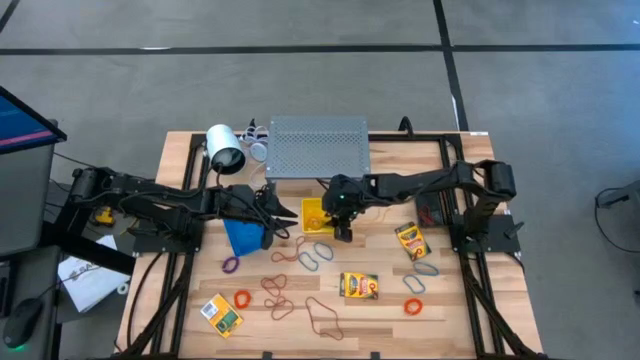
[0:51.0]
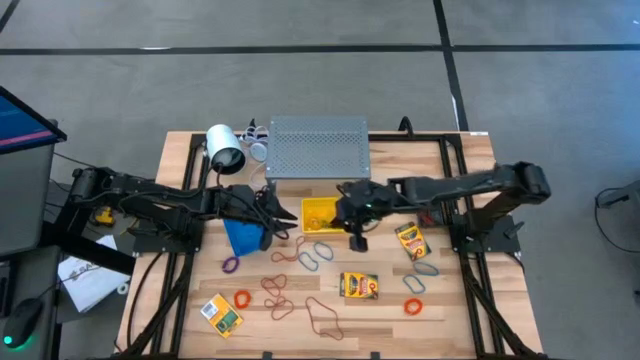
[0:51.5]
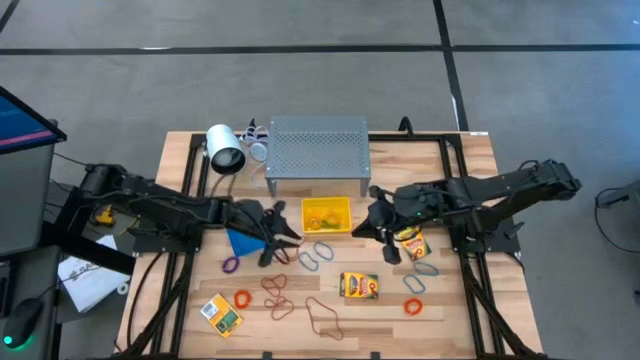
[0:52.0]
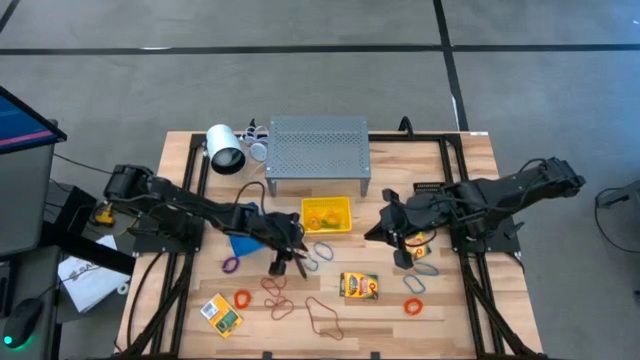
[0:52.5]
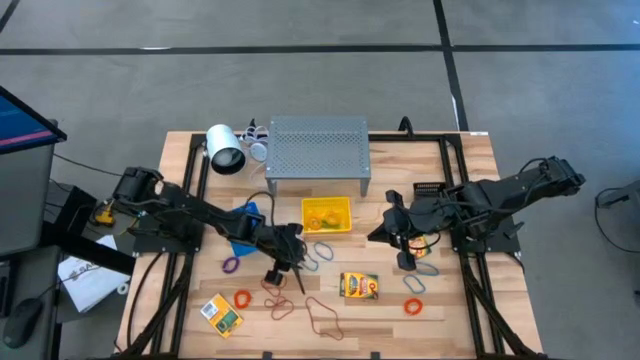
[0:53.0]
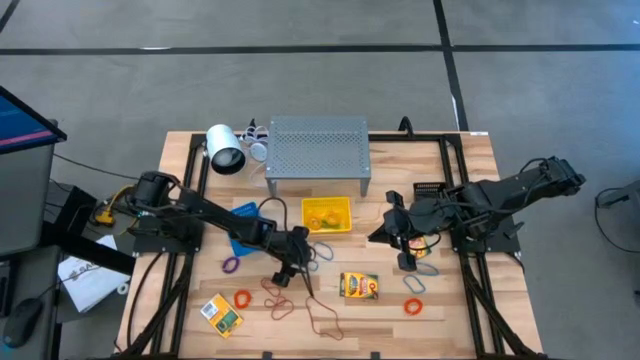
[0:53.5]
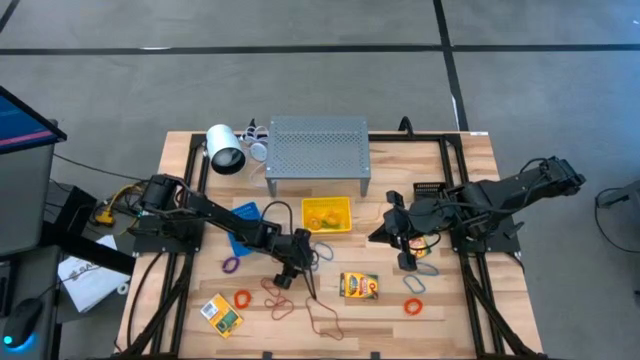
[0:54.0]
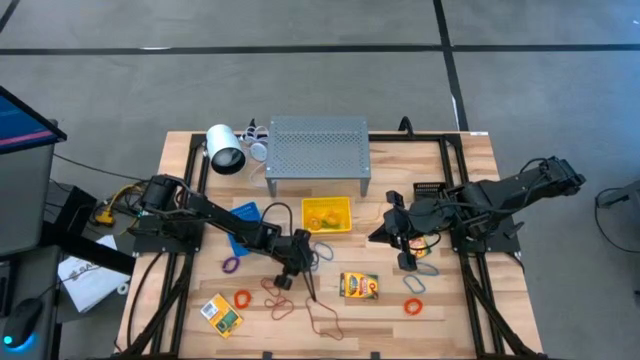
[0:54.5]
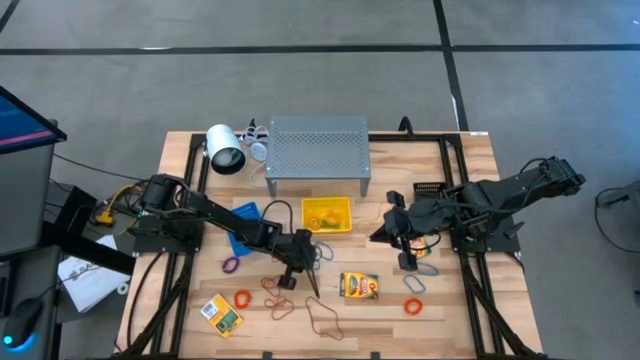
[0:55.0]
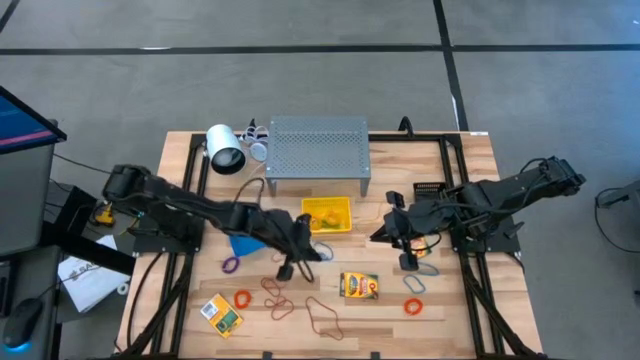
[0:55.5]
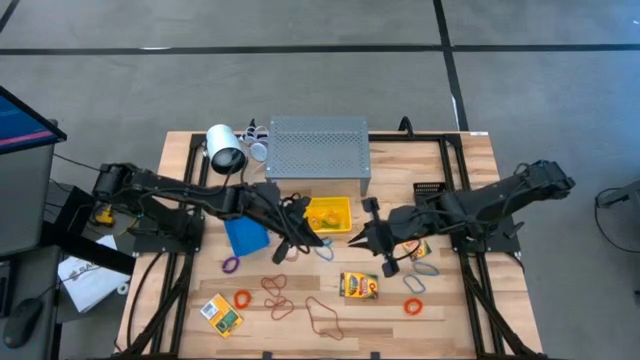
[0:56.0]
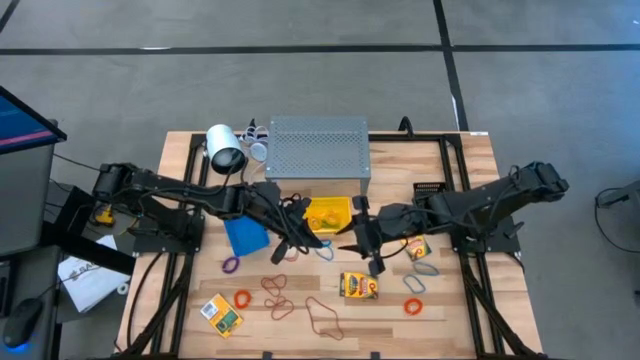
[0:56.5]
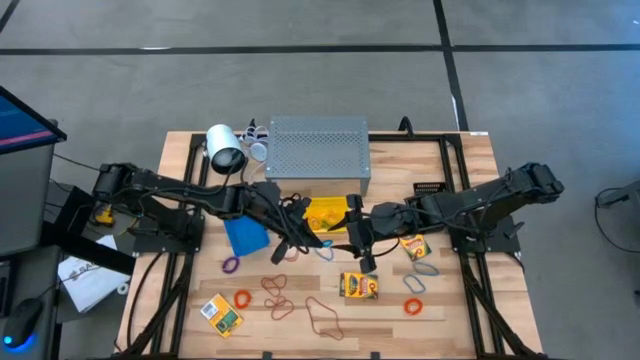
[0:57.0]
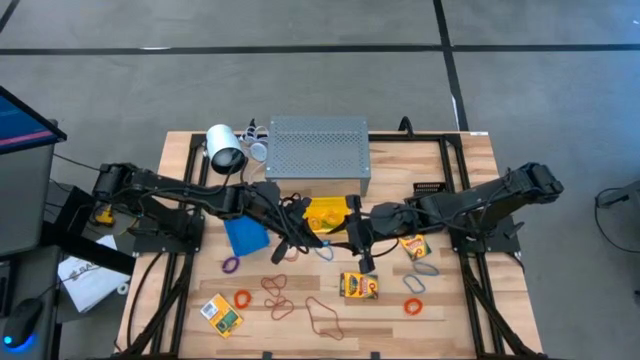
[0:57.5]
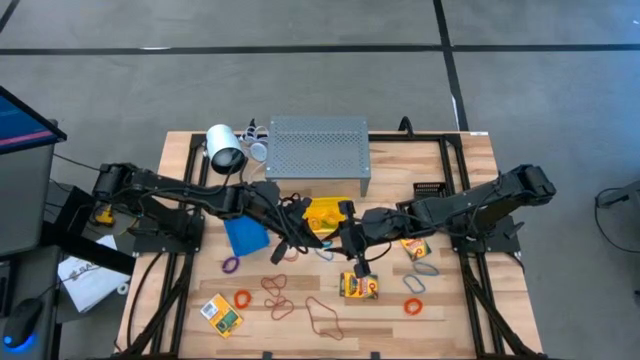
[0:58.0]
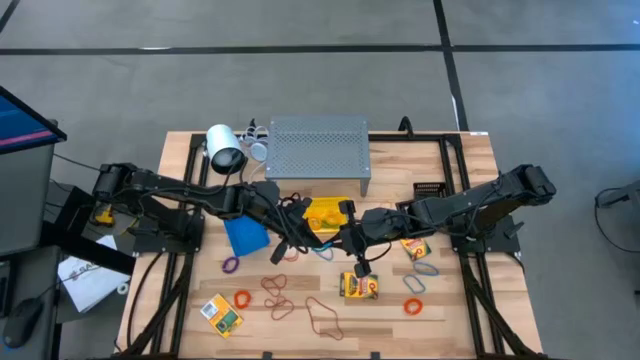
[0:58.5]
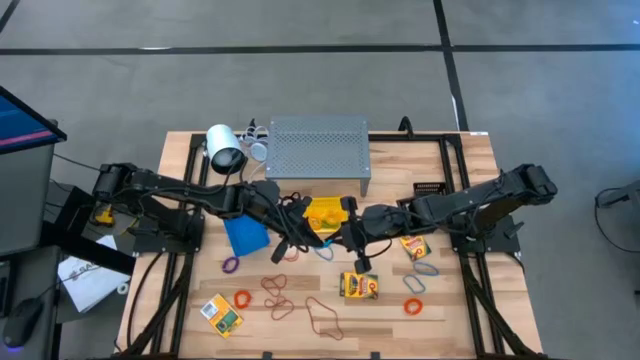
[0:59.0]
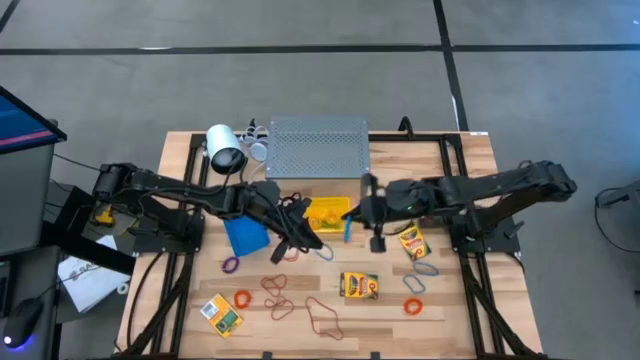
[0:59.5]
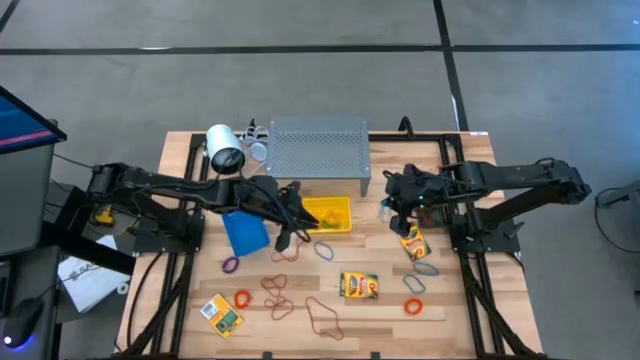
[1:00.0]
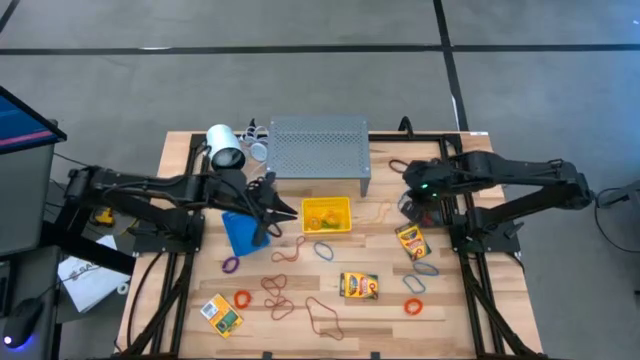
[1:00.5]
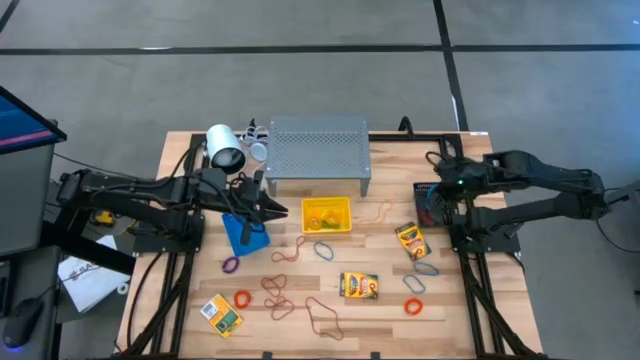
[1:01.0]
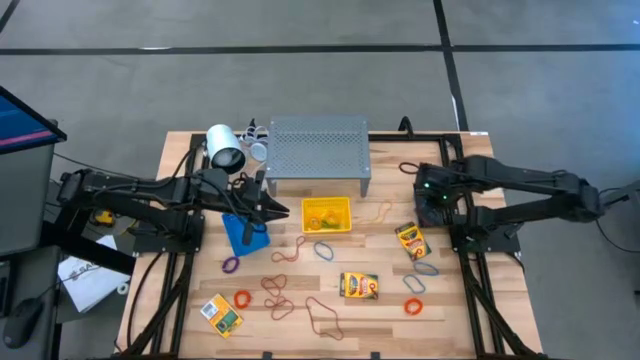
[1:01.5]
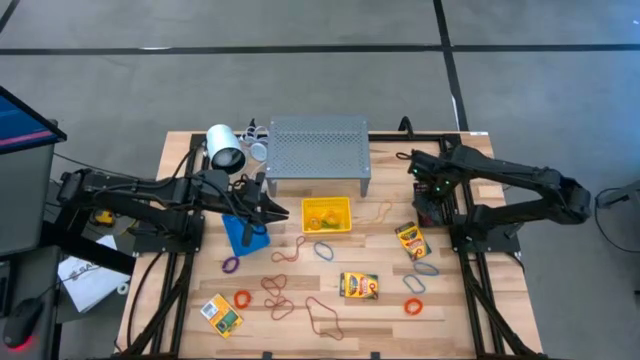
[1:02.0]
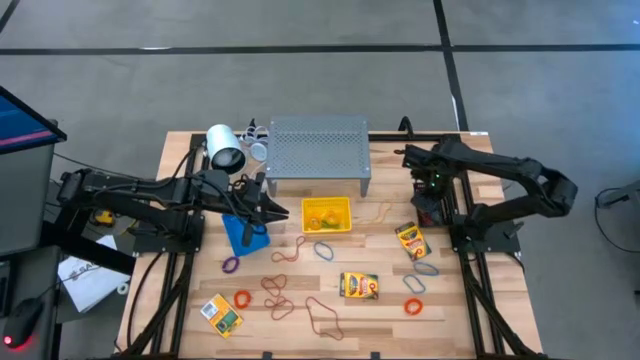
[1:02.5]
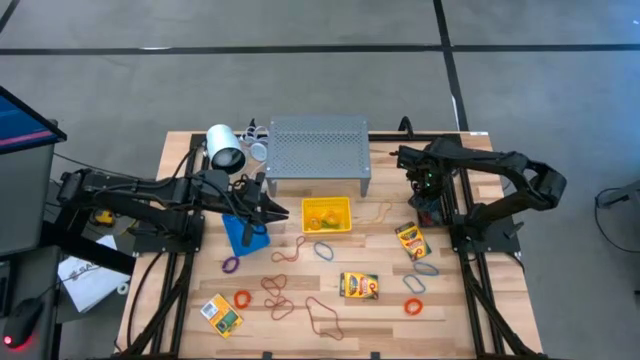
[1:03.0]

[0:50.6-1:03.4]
Task: Pick & Place Office Desk Supplies
Put the blue rubber band into the black bin

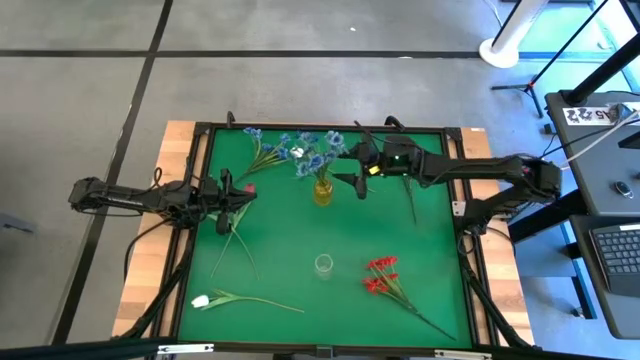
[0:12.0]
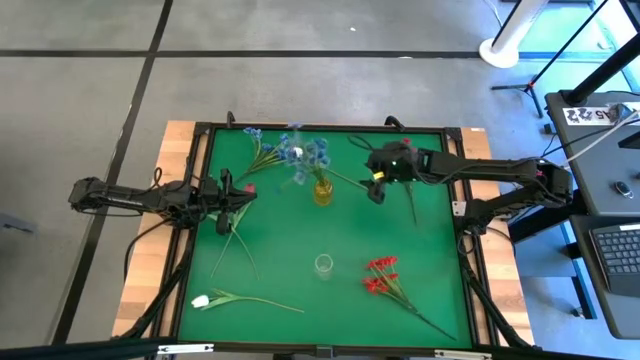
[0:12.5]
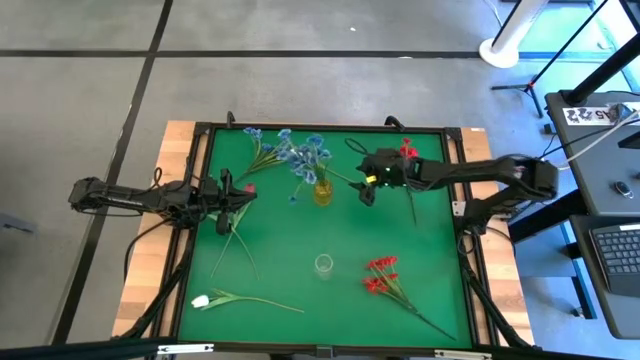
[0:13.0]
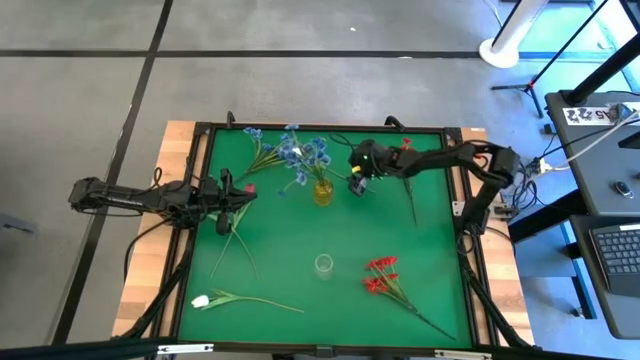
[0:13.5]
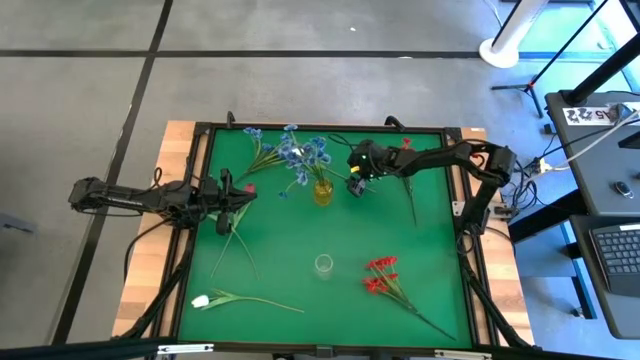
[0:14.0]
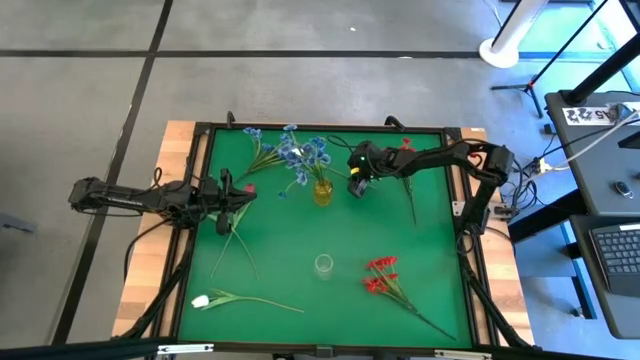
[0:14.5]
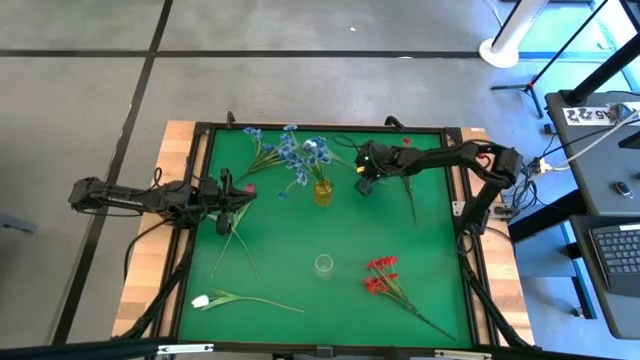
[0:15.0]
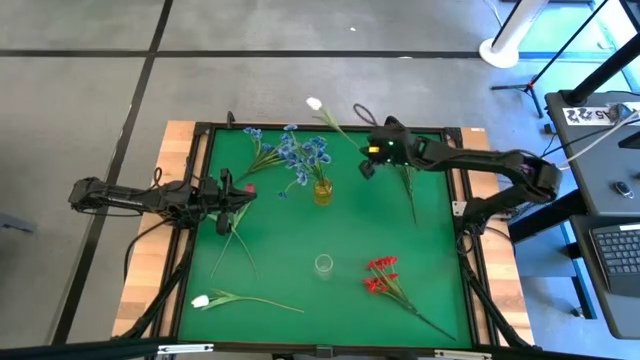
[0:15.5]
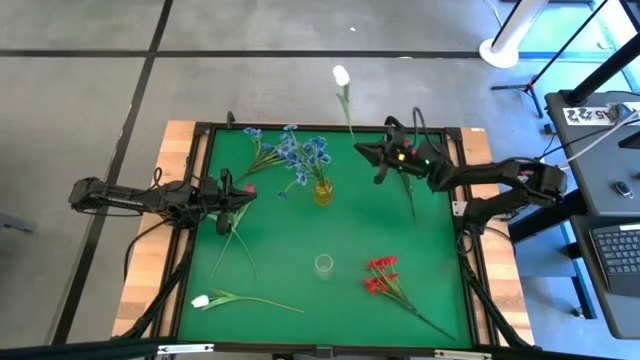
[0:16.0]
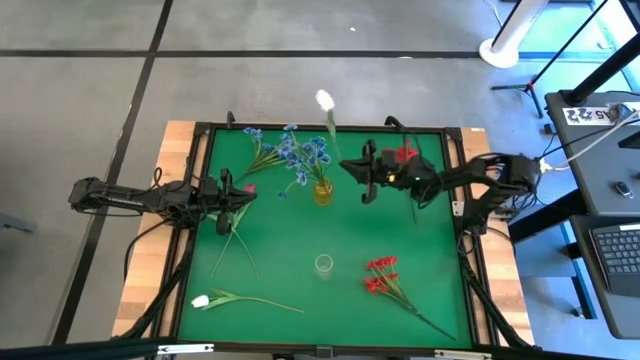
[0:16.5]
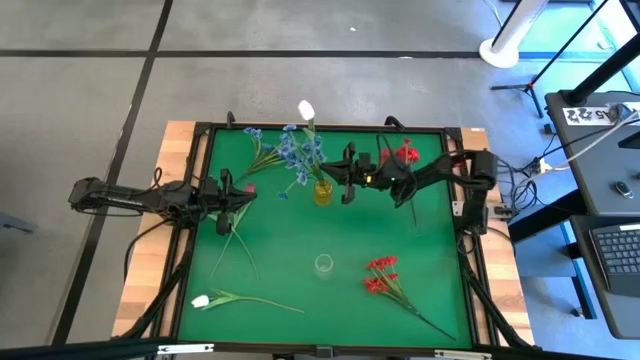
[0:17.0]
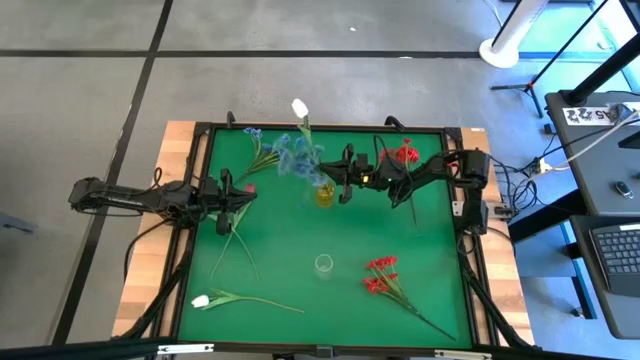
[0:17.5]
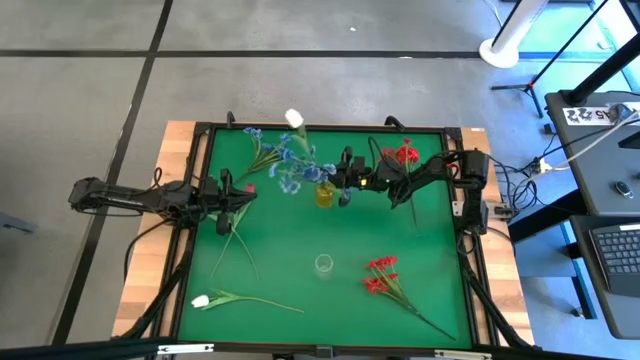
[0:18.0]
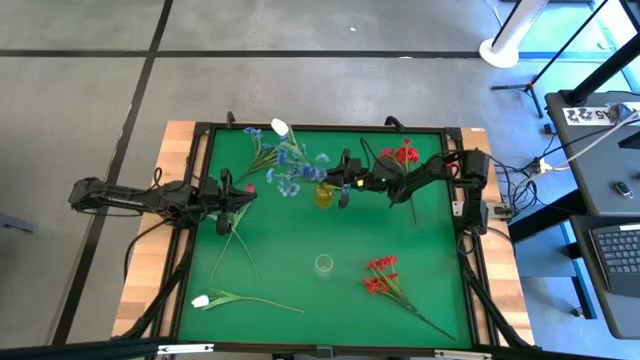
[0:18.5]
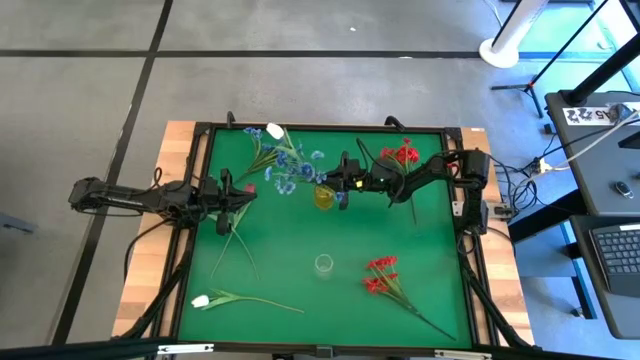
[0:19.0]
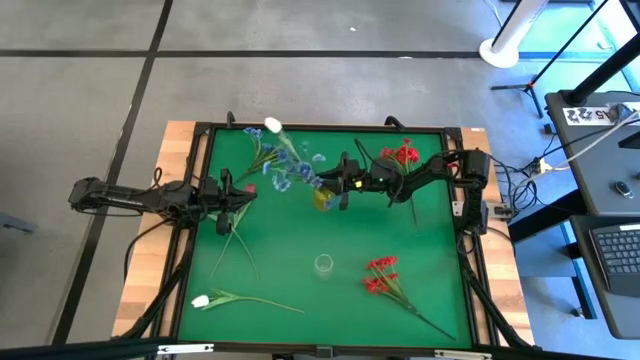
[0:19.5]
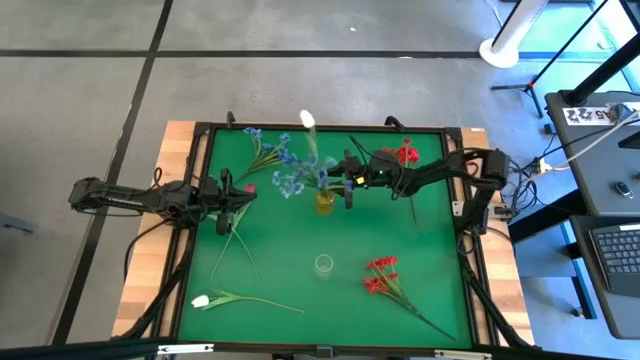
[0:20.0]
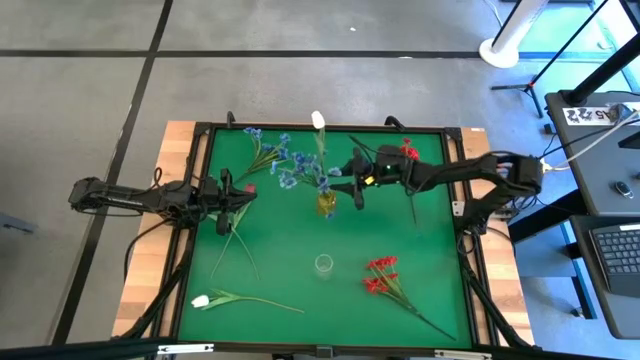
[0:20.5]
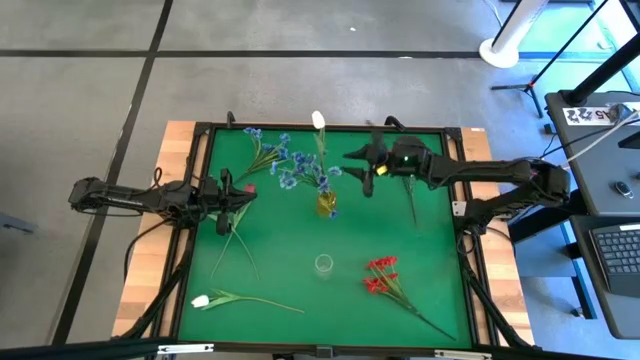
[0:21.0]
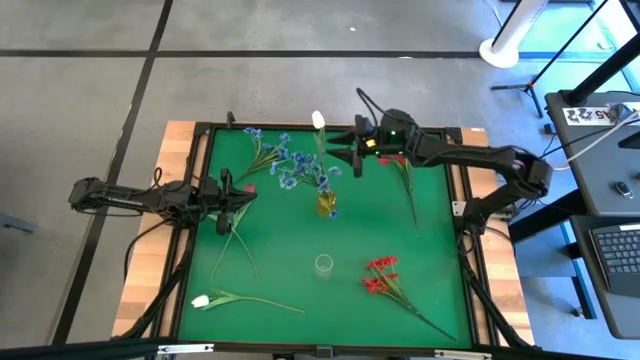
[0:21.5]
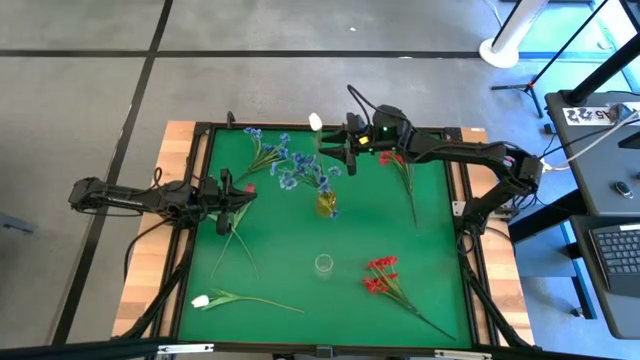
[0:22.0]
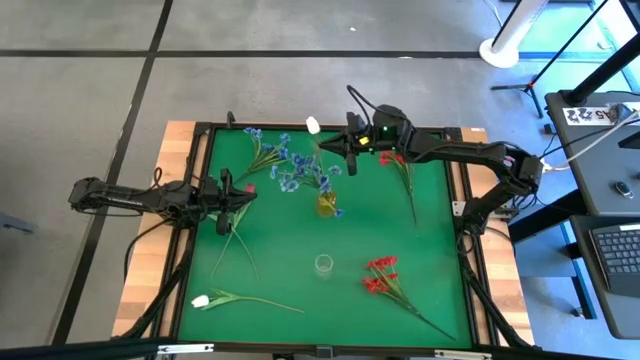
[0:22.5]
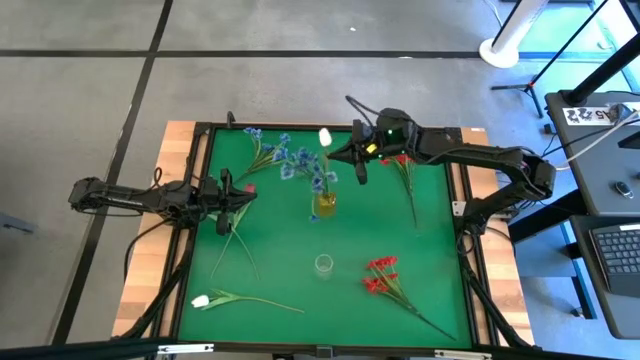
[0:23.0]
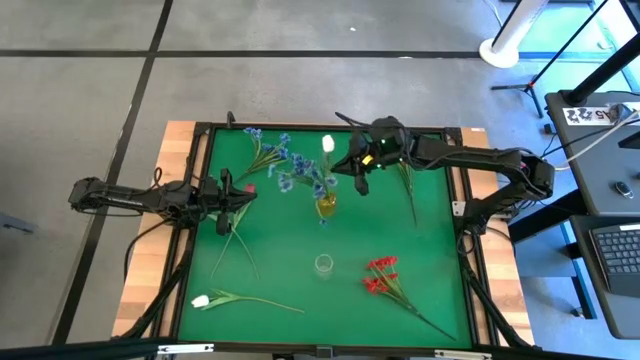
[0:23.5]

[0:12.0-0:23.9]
Task: Sort flowers into vase by color
Put the top white flower into the yellow flower vase
